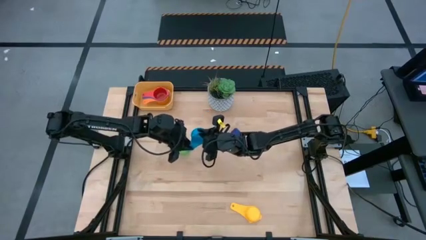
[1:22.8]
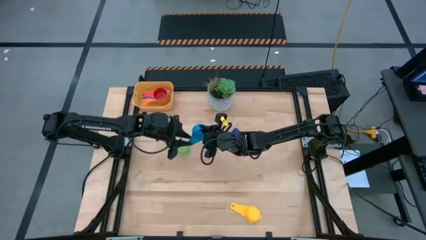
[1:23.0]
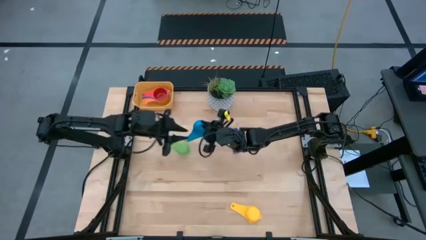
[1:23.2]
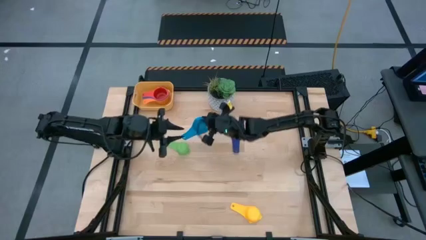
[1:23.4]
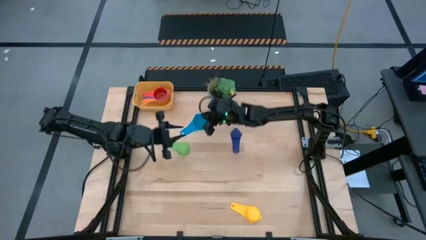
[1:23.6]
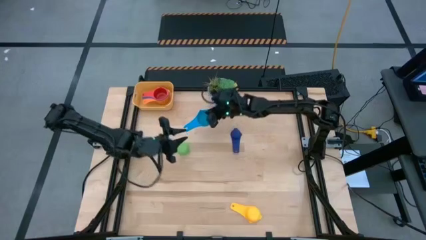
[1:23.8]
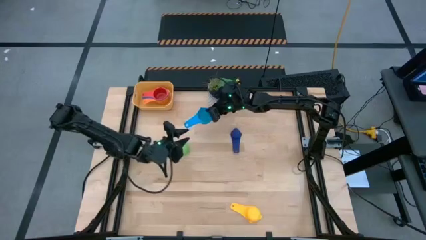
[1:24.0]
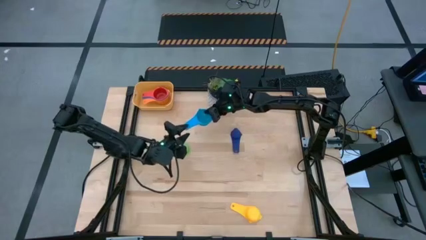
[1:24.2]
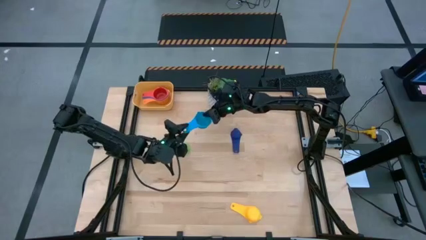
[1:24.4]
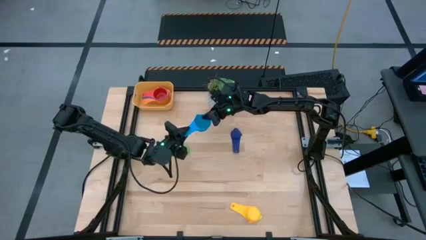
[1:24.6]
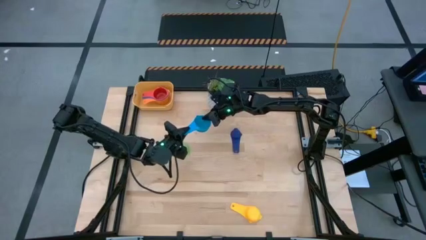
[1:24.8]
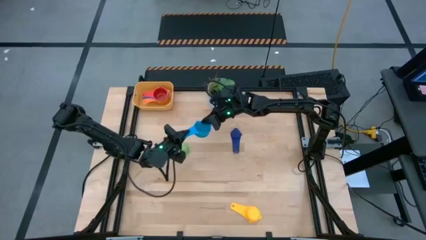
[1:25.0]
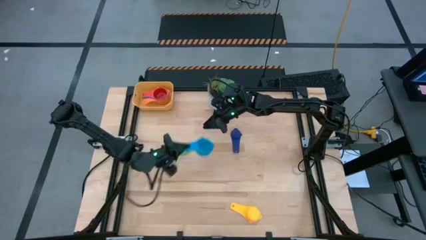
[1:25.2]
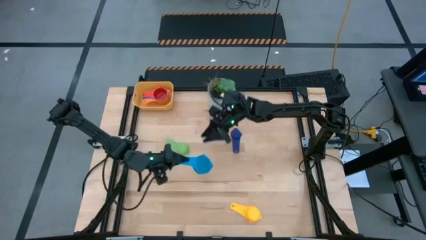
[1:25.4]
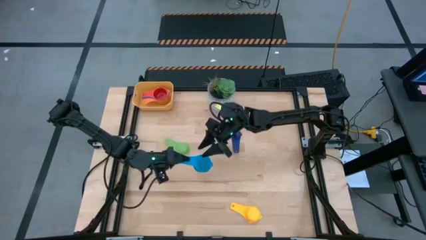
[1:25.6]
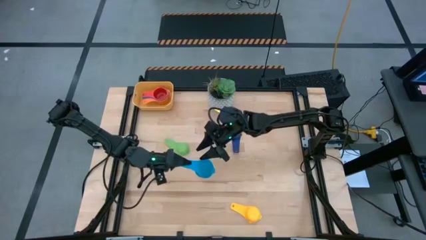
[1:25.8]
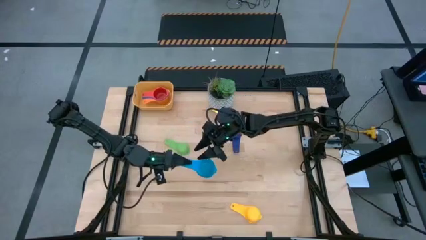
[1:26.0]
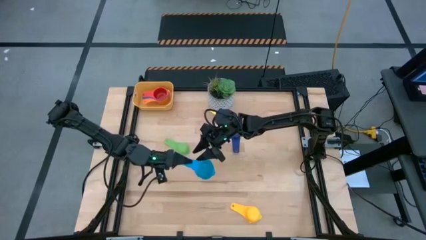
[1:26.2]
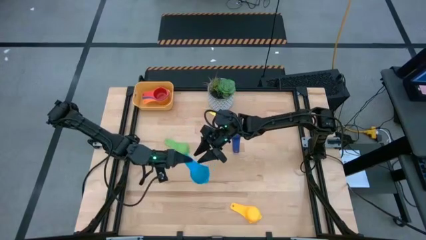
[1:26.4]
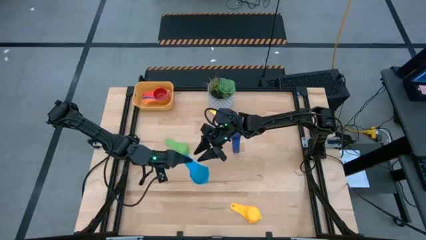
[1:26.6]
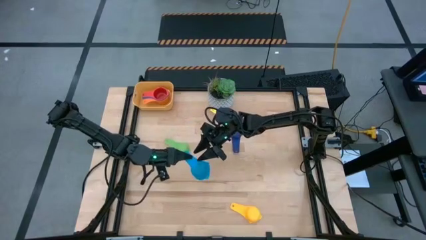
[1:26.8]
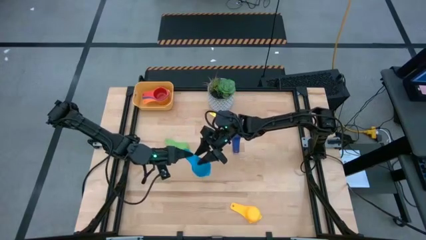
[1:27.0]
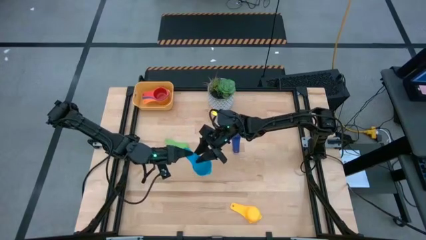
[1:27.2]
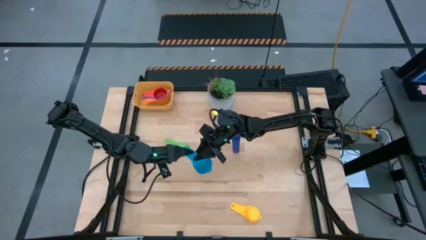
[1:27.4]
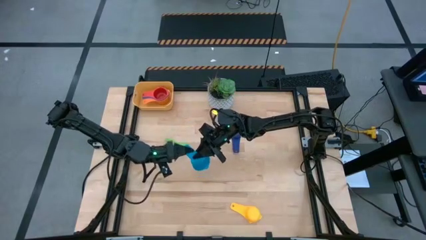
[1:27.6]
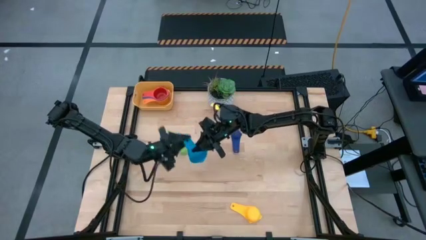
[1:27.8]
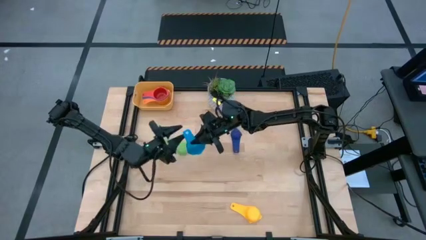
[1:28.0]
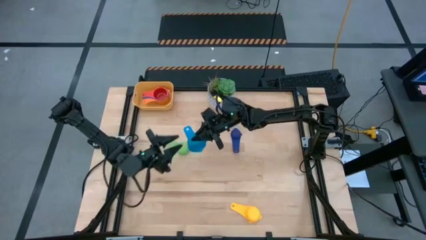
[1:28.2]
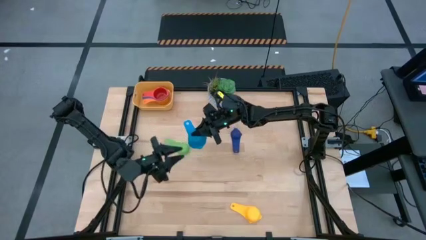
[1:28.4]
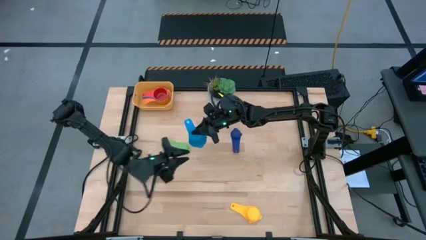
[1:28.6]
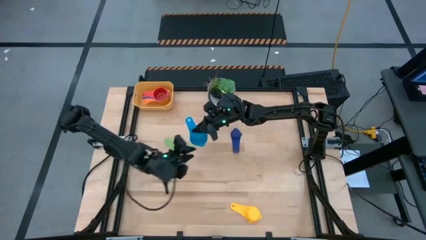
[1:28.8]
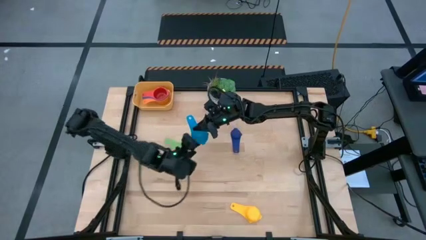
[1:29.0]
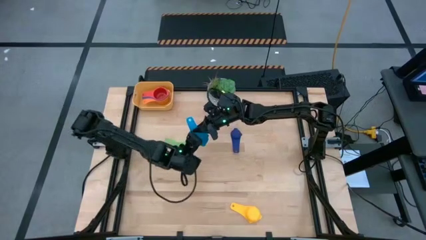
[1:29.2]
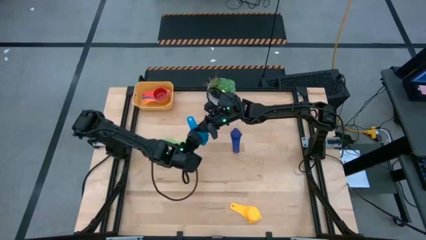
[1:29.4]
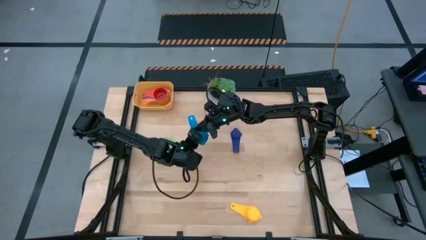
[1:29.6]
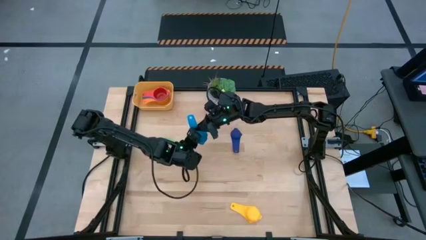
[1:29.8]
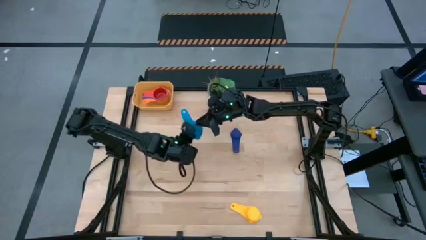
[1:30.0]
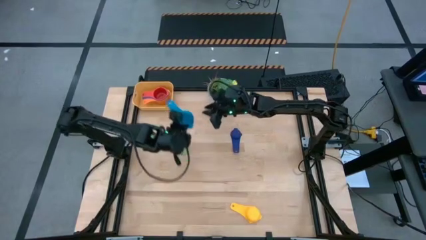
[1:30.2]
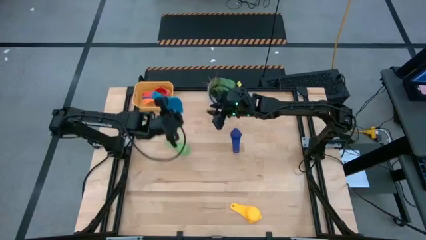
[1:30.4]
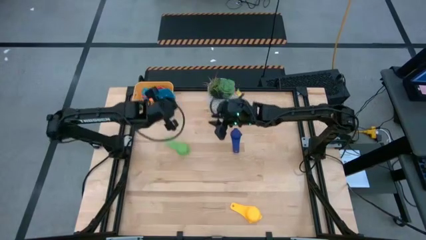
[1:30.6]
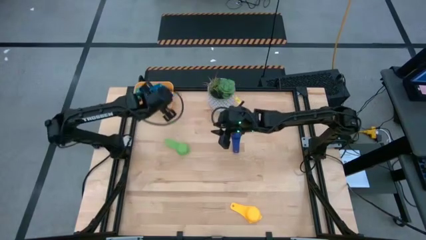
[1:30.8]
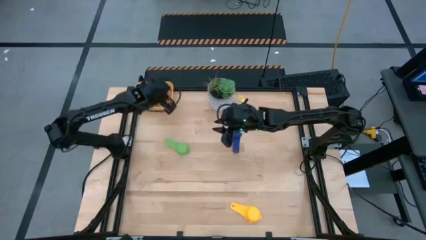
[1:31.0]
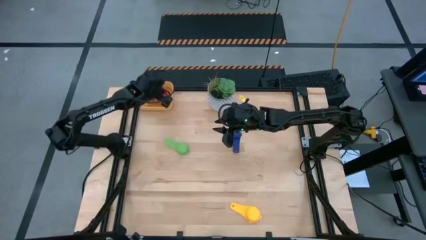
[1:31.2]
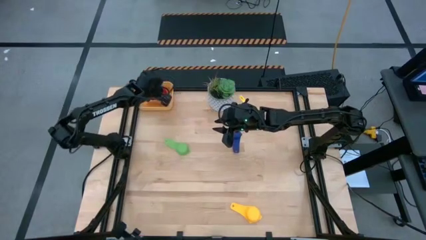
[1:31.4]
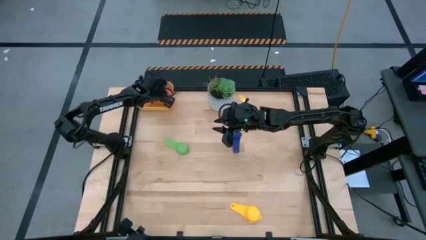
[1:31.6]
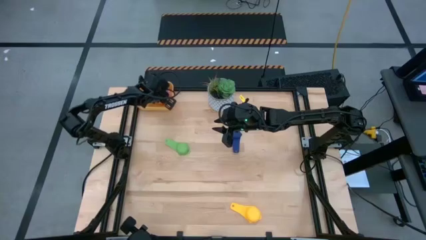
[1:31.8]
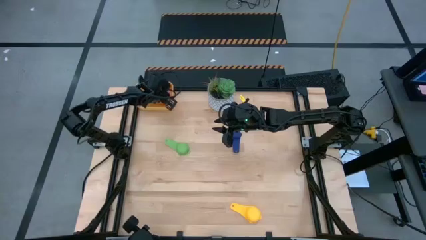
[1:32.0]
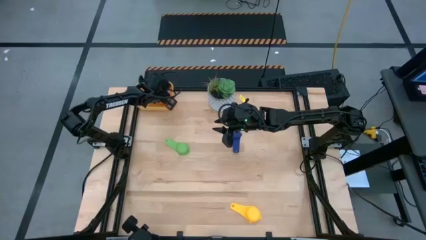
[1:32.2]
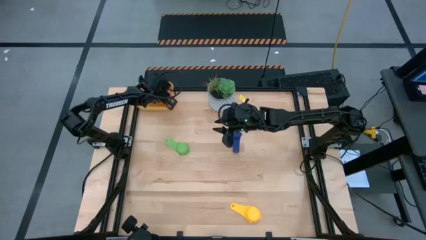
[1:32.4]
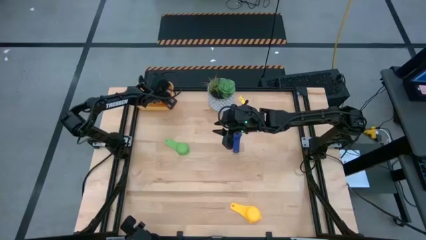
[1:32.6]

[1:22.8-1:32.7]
Task: Nest measuring cups in basket
Stack the light blue measuring cup on top of the dark orange measuring cup in the yellow bin
